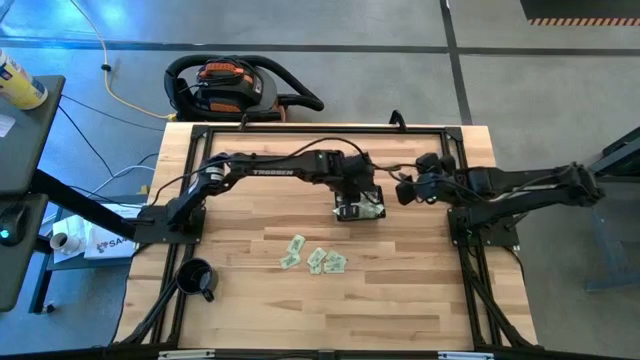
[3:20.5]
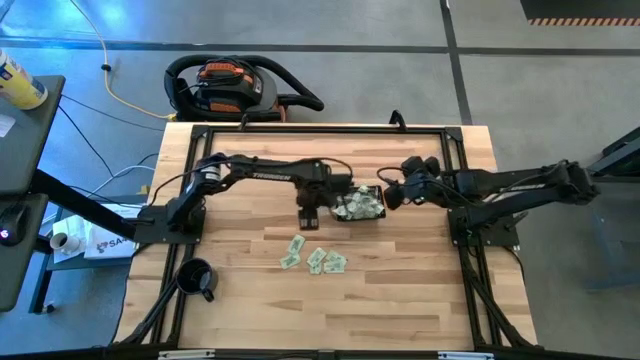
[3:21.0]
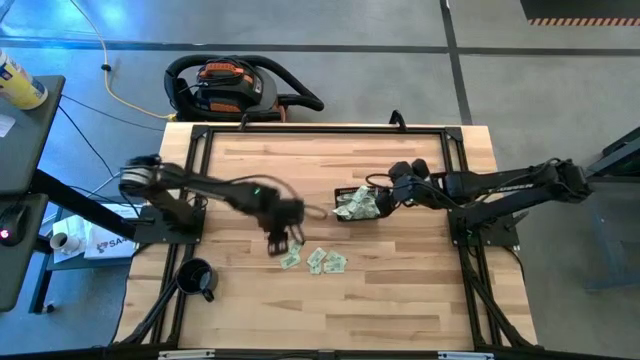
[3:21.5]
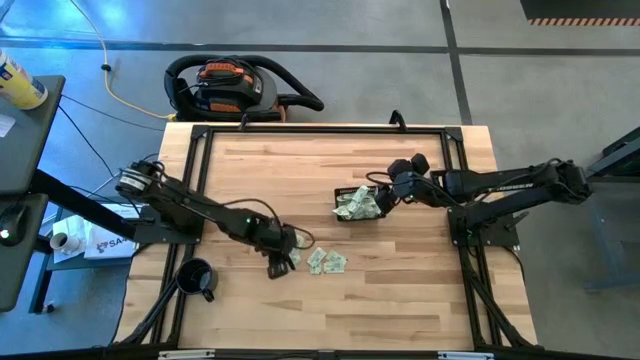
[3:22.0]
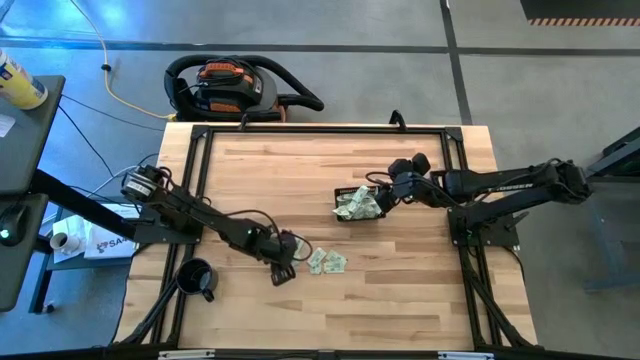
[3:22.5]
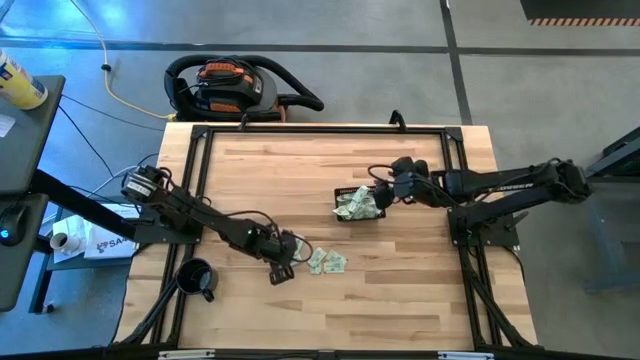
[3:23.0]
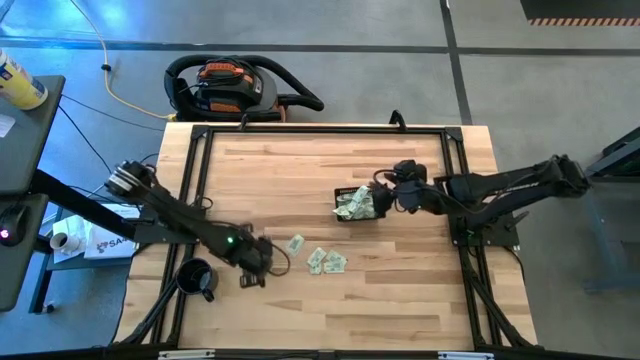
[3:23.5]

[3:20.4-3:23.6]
Task: Pick and place Stevia / Truvia into bins
Put the green stevia packet into the black bin

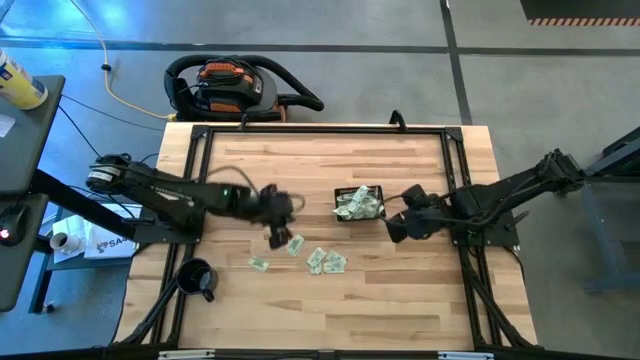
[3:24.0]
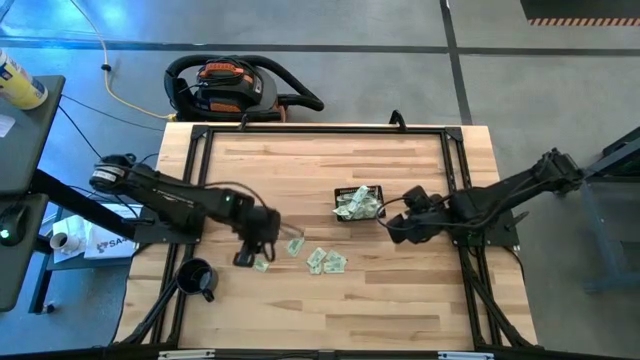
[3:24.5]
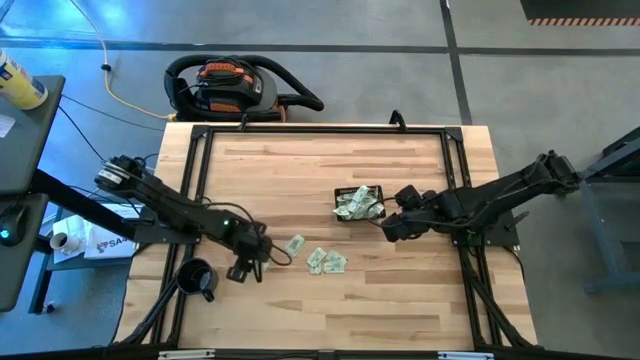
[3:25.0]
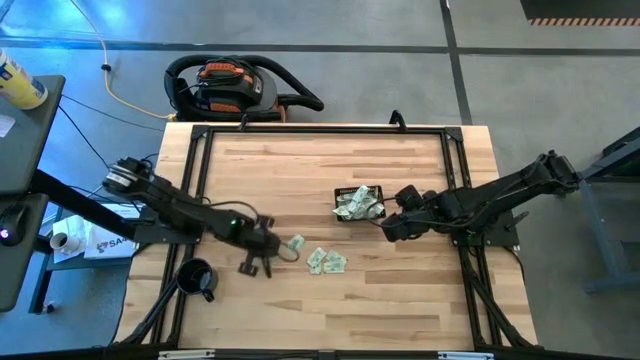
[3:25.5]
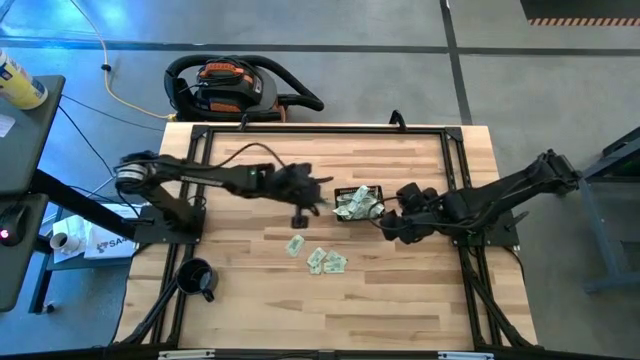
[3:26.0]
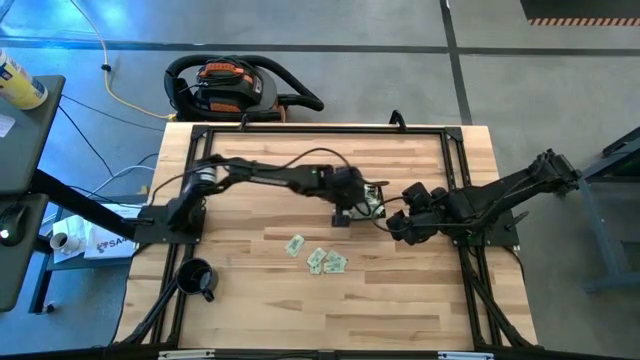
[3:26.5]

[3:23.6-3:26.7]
Put the green stevia packet into the black bin

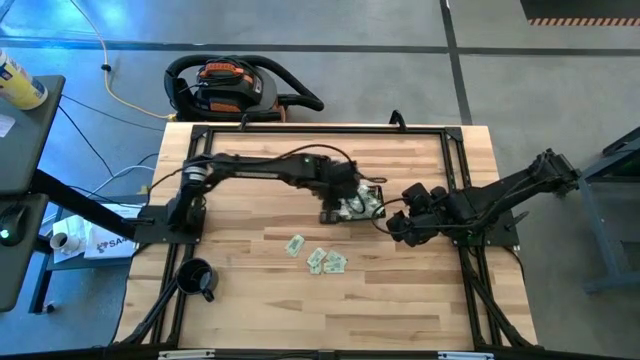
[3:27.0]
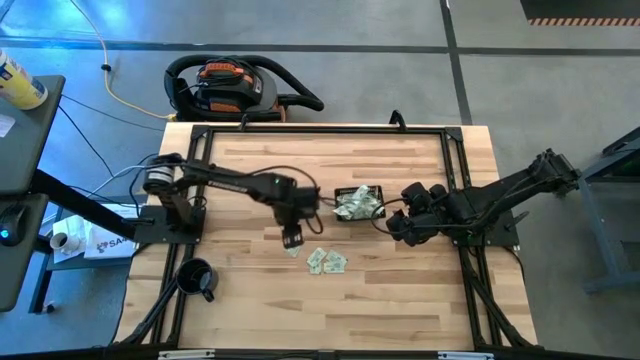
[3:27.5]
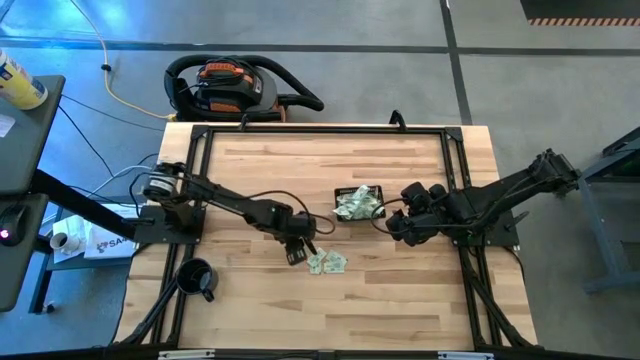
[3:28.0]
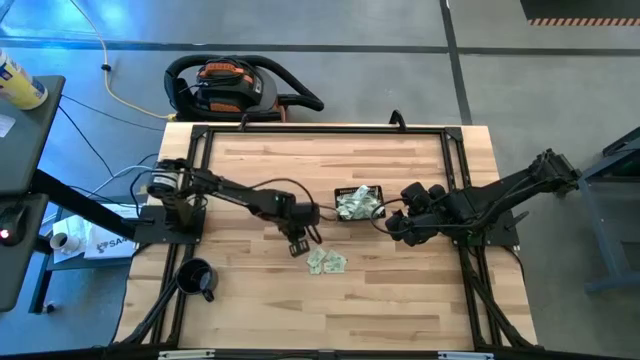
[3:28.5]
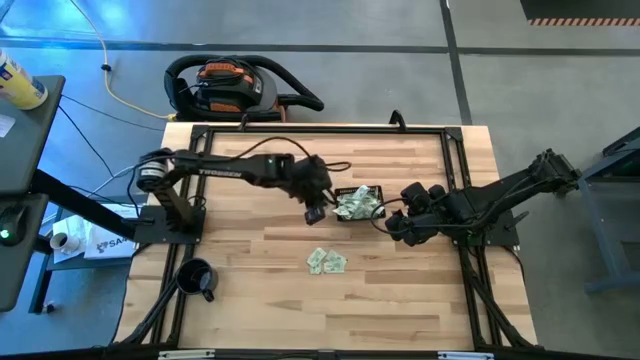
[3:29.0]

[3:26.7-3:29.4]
Put the green stevia packet into the black bin

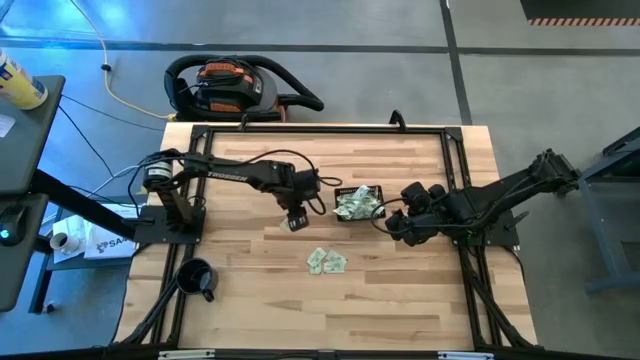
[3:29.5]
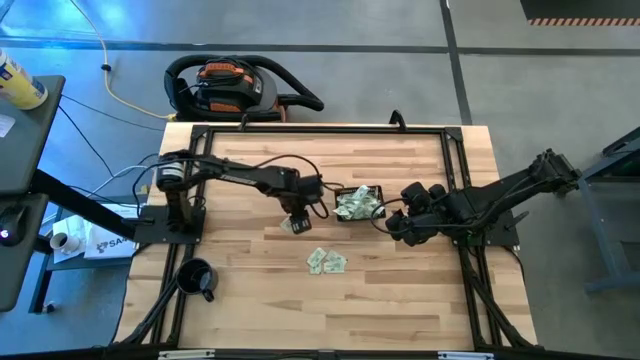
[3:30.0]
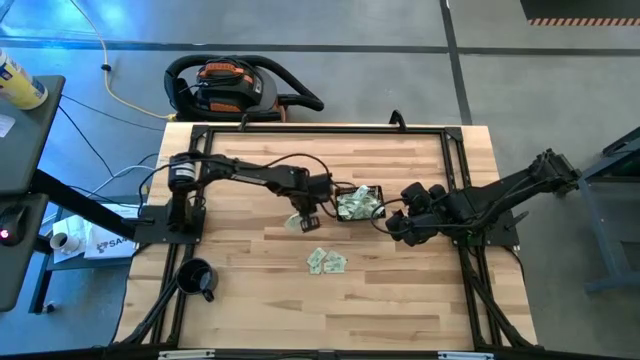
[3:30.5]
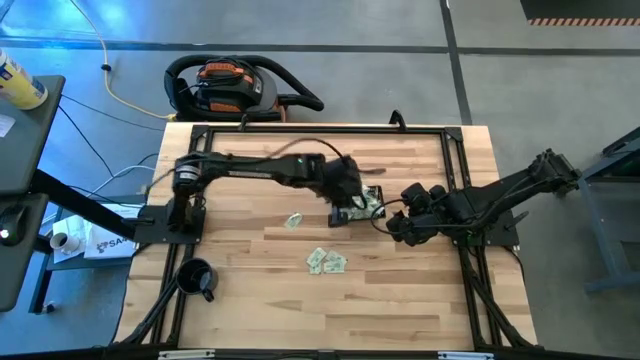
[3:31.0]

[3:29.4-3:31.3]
Put the green stevia packet into the black bin

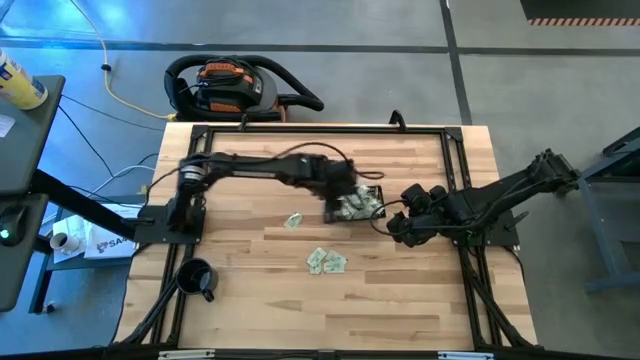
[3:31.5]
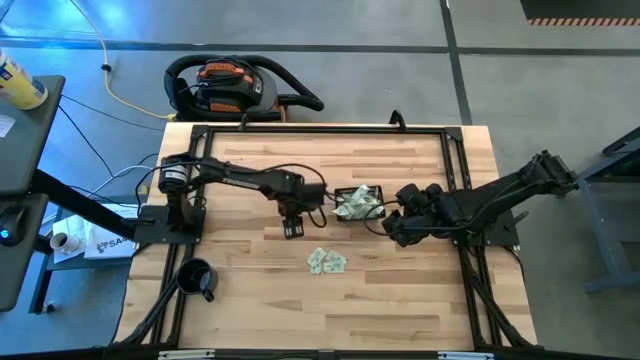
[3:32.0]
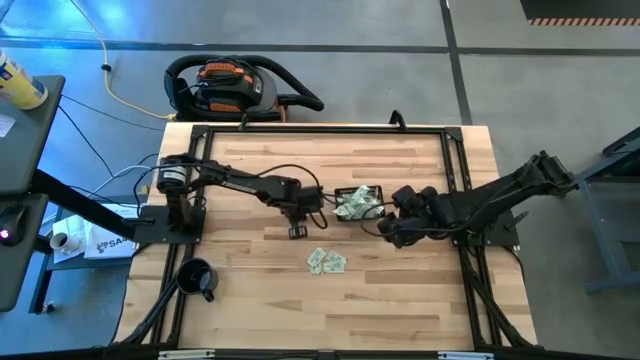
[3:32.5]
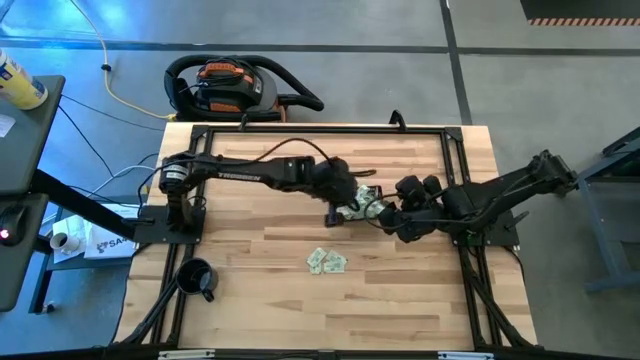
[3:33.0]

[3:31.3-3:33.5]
Put the green stevia packet into the black bin

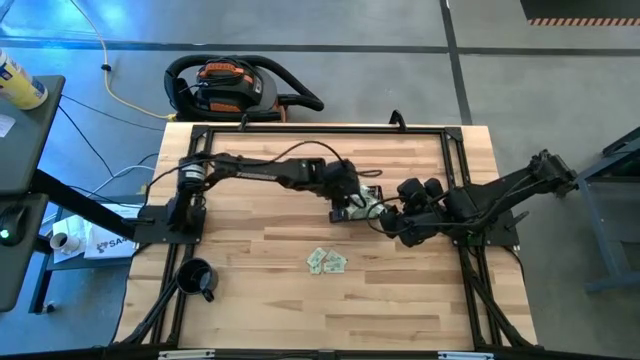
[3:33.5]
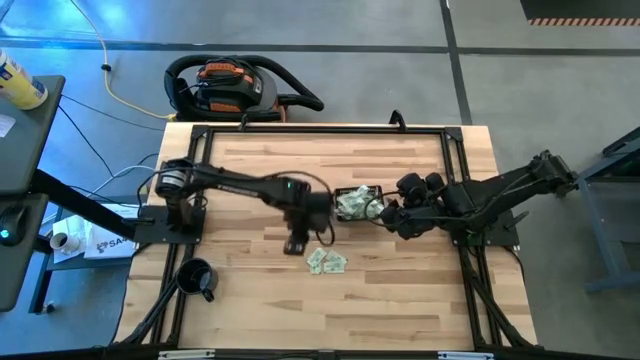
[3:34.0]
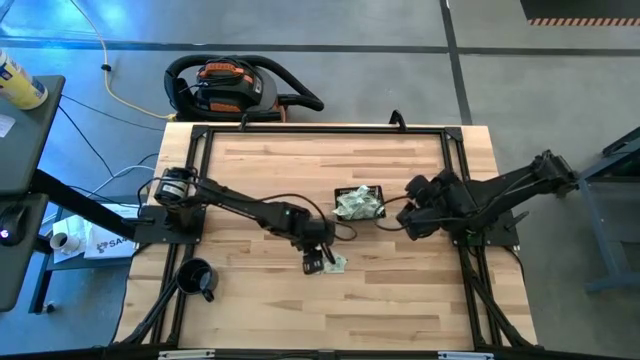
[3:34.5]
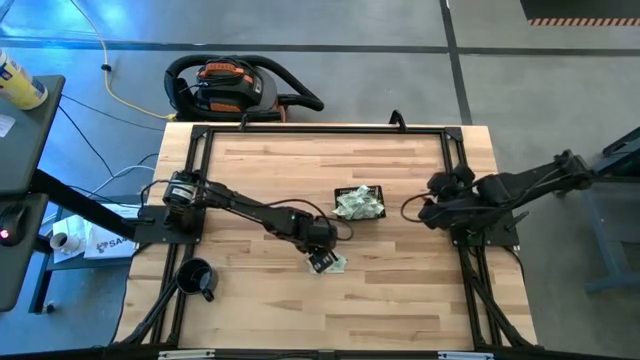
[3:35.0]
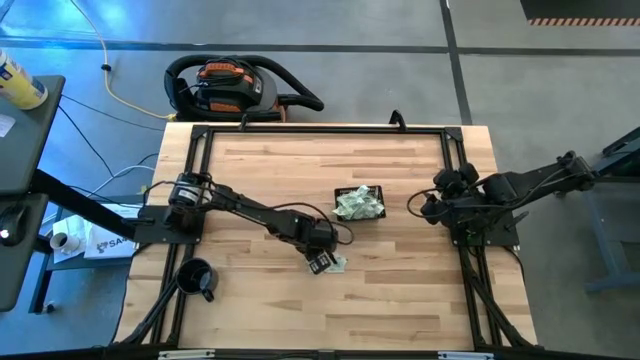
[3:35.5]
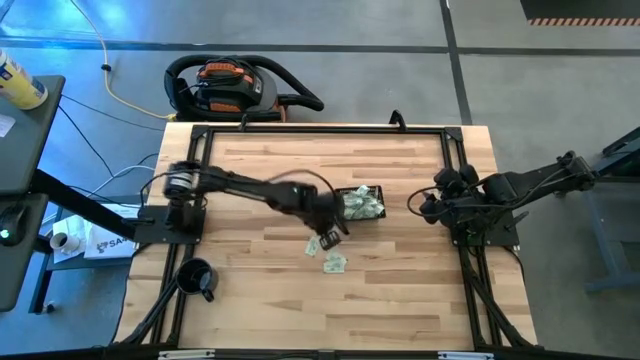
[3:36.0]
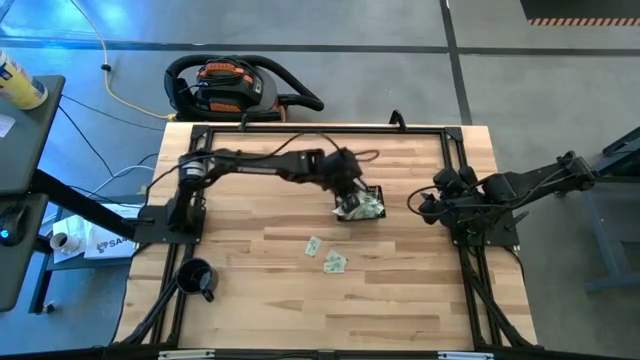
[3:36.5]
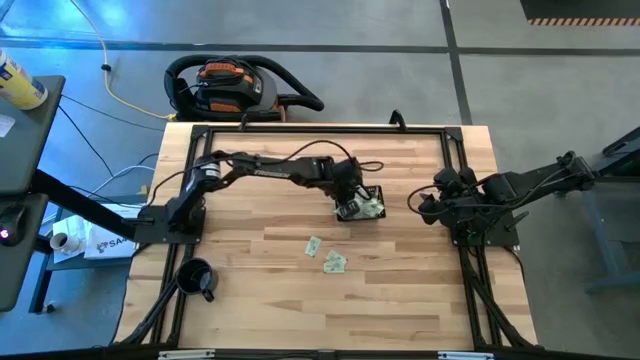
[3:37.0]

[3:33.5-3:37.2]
Put the green stevia packet into the black bin

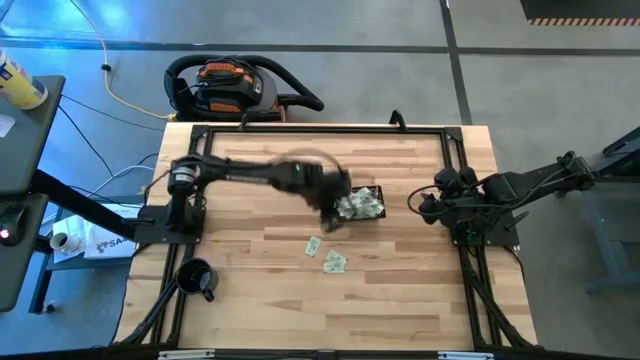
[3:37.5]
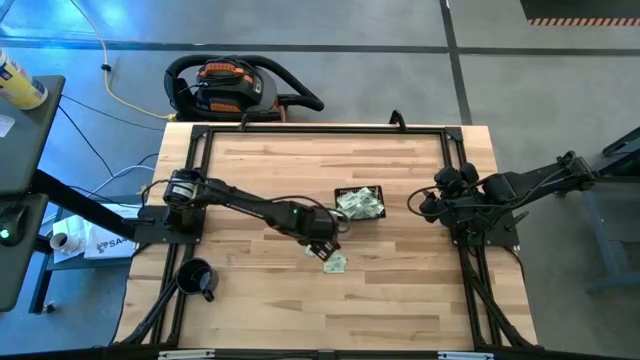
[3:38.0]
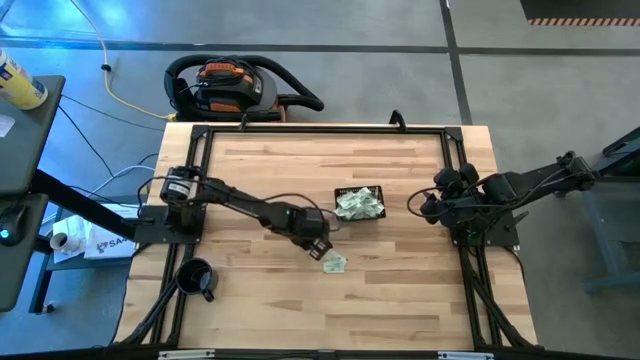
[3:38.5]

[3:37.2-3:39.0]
Put the green stevia packet into the black bin

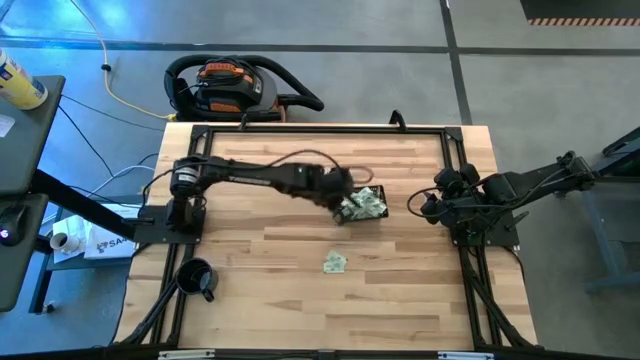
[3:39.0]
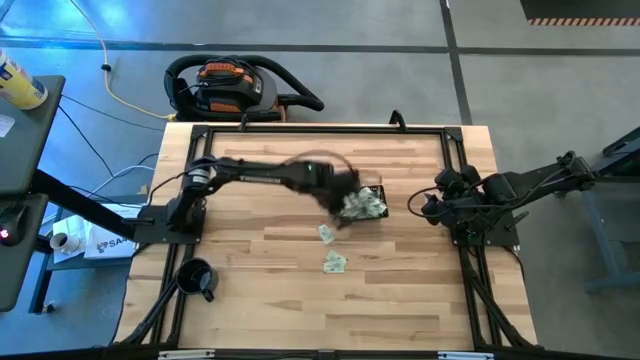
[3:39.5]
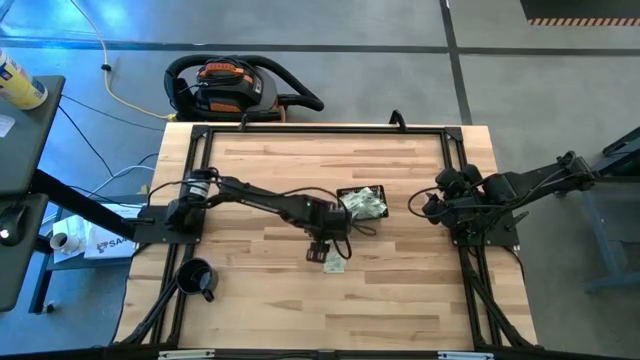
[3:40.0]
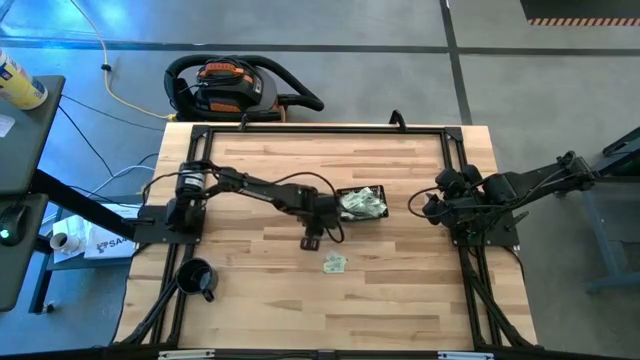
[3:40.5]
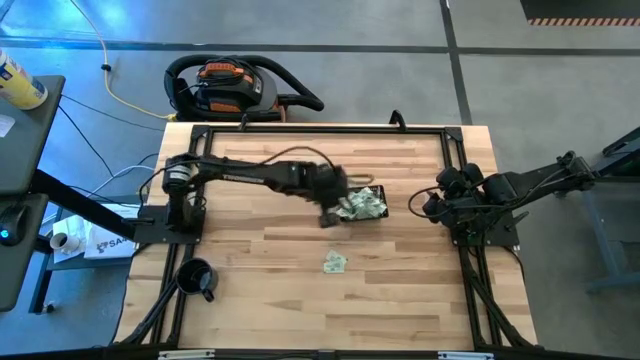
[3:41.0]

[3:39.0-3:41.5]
Put the green stevia packet into the black bin

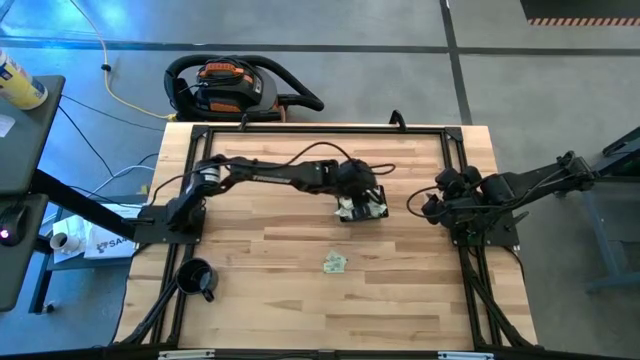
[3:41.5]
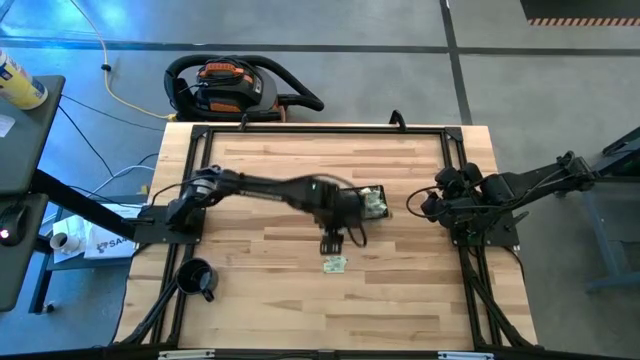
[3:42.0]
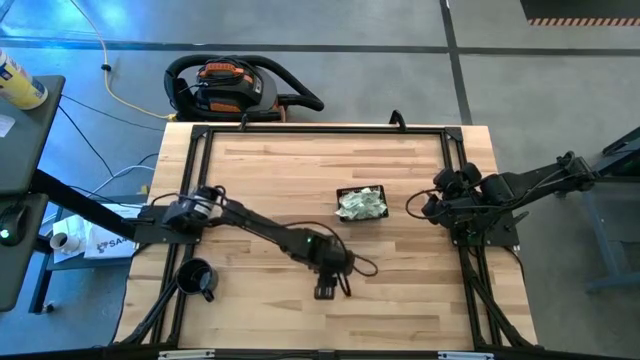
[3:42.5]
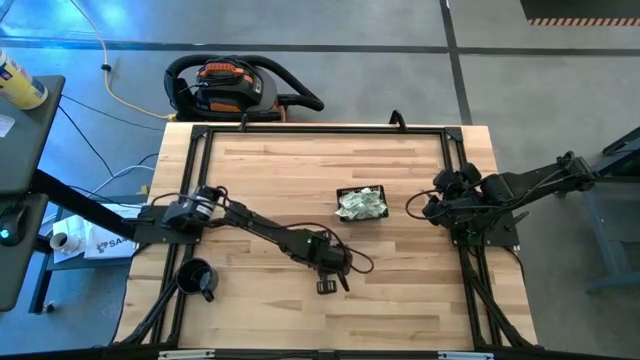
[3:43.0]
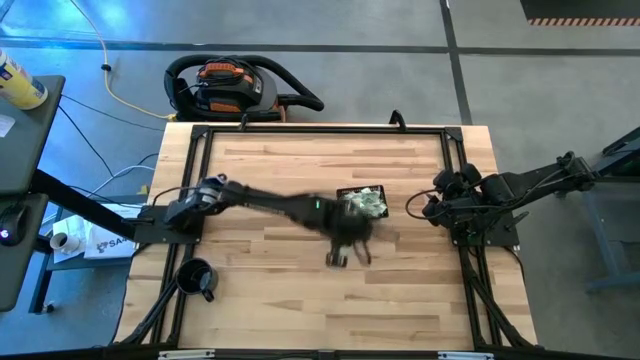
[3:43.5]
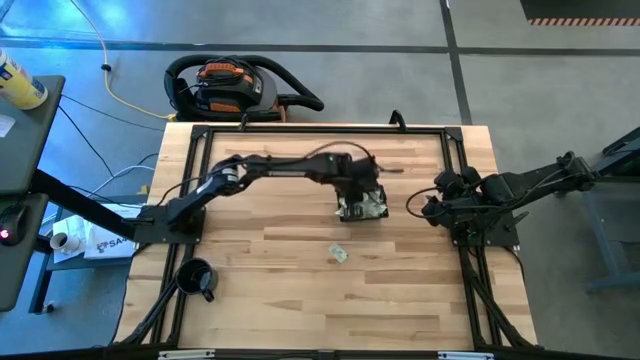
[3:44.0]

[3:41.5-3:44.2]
Put the green stevia packet into the black bin
